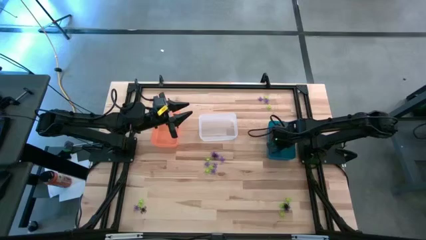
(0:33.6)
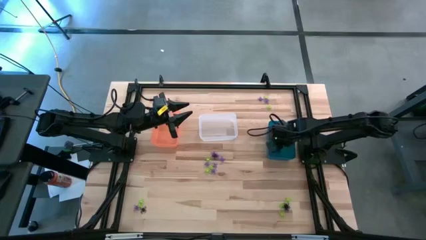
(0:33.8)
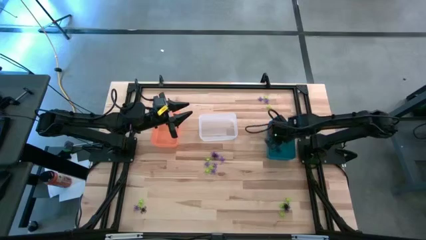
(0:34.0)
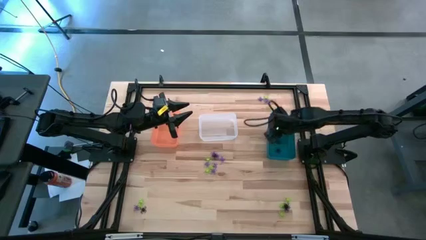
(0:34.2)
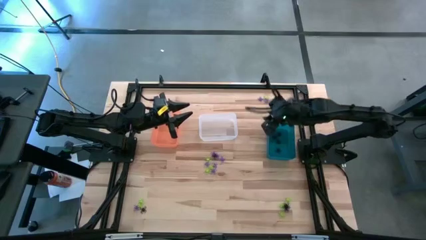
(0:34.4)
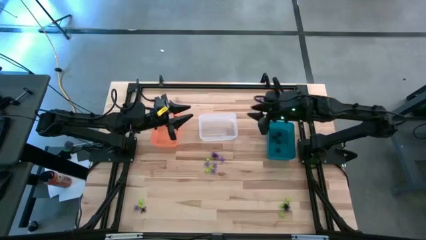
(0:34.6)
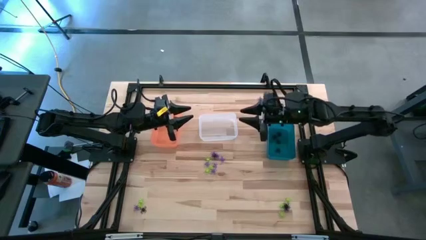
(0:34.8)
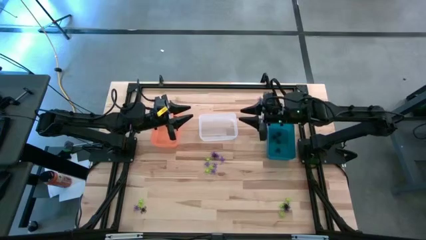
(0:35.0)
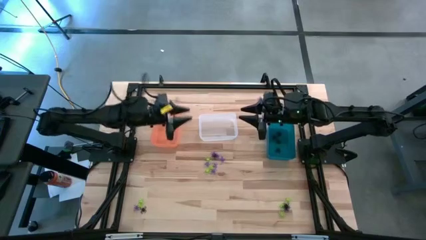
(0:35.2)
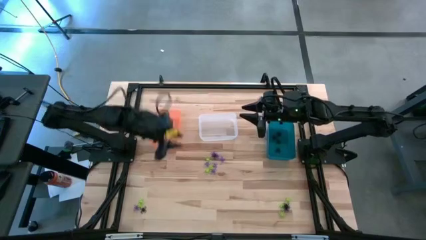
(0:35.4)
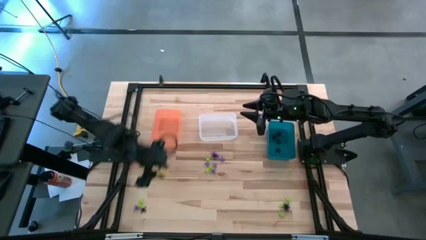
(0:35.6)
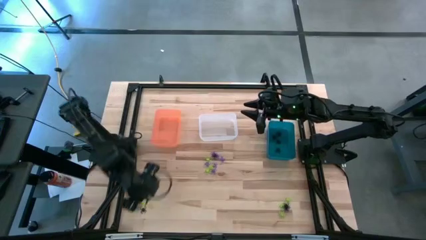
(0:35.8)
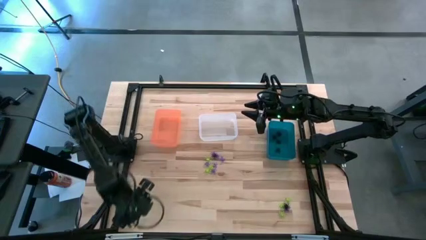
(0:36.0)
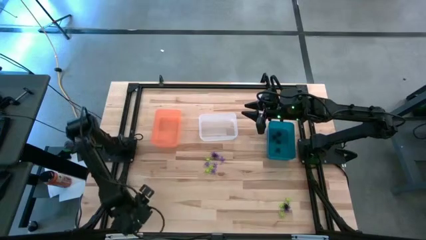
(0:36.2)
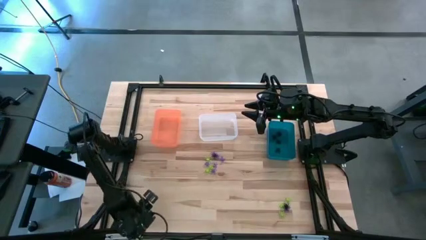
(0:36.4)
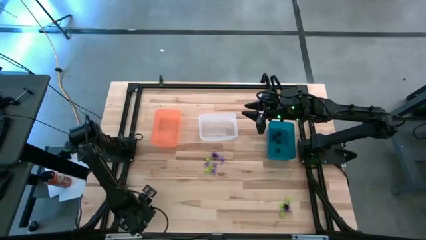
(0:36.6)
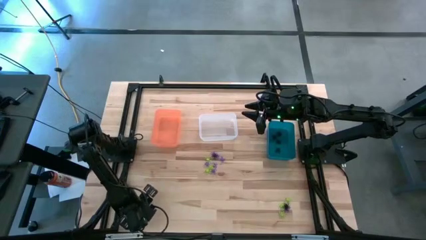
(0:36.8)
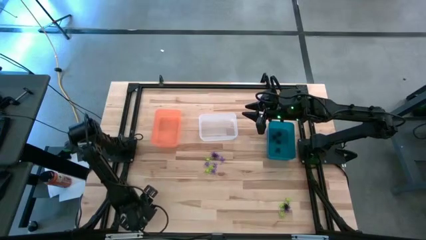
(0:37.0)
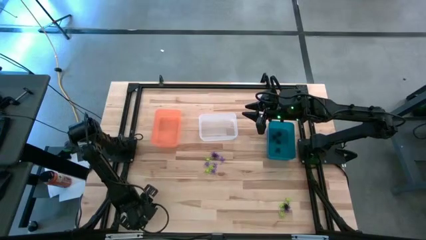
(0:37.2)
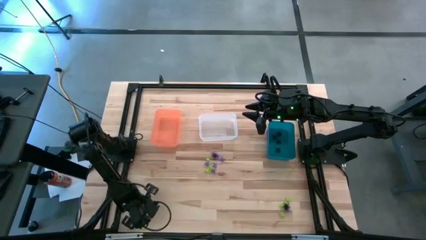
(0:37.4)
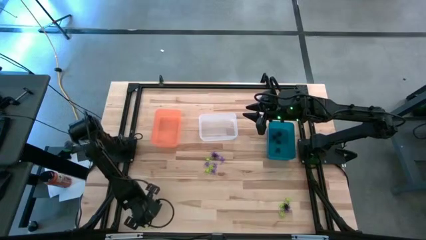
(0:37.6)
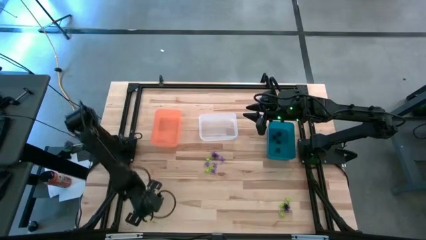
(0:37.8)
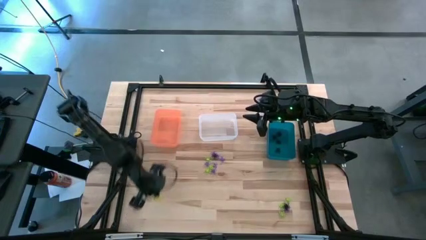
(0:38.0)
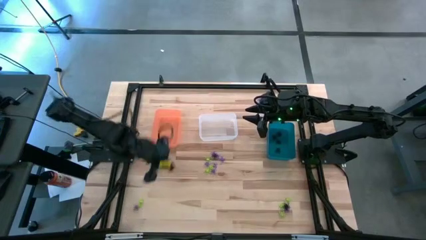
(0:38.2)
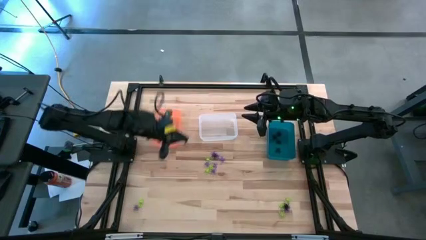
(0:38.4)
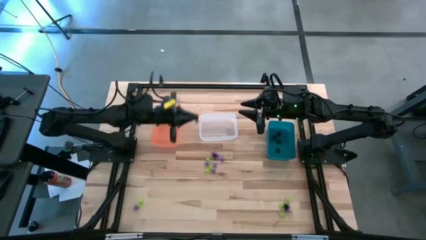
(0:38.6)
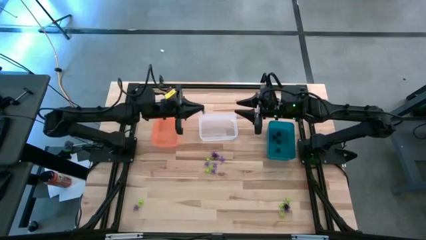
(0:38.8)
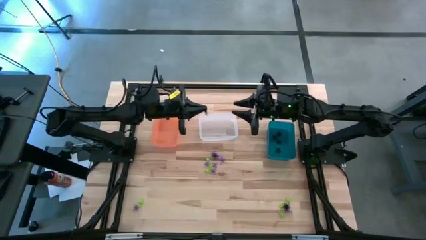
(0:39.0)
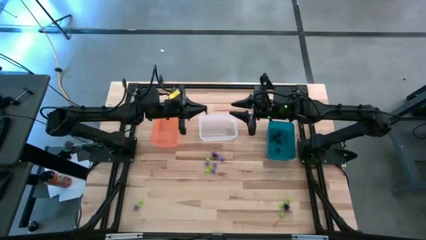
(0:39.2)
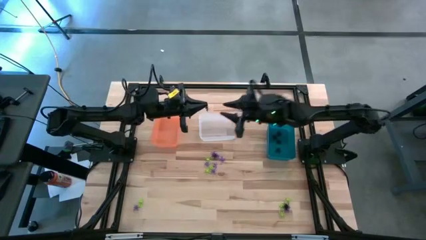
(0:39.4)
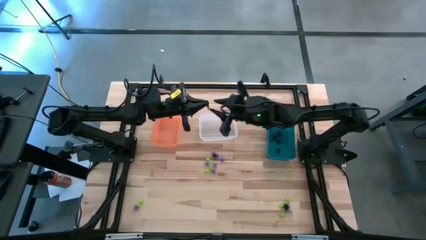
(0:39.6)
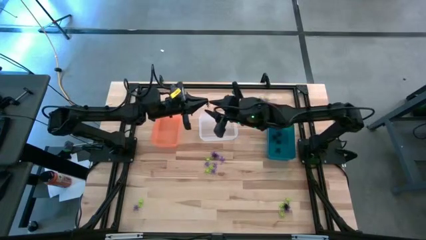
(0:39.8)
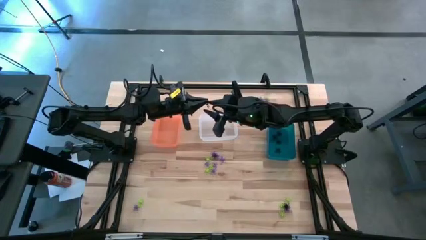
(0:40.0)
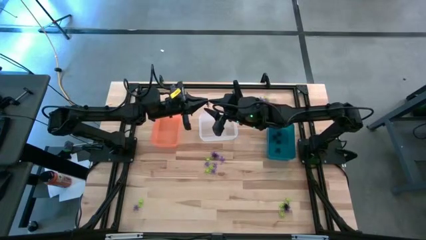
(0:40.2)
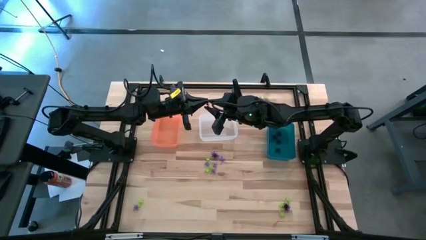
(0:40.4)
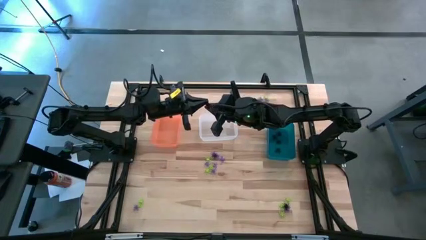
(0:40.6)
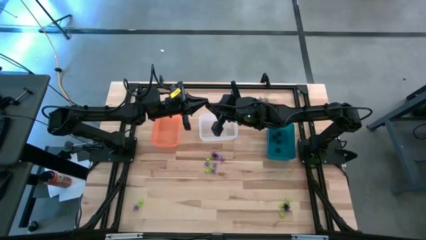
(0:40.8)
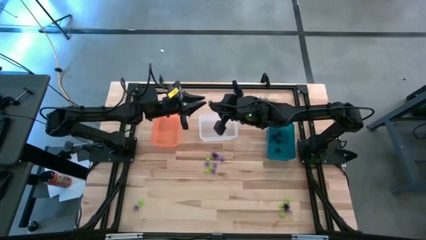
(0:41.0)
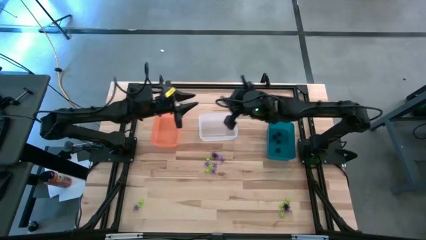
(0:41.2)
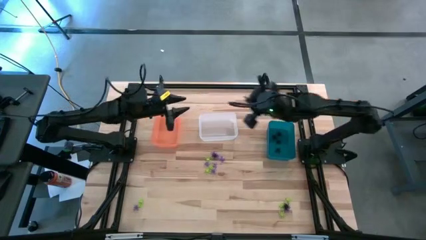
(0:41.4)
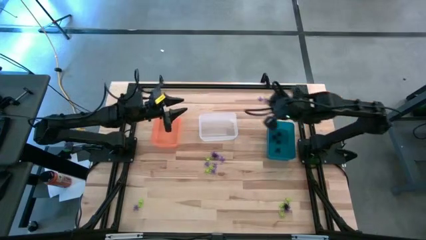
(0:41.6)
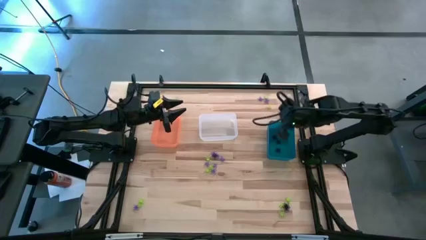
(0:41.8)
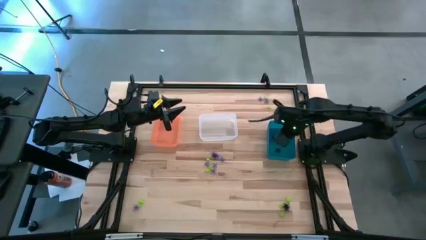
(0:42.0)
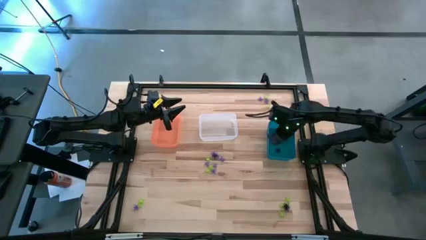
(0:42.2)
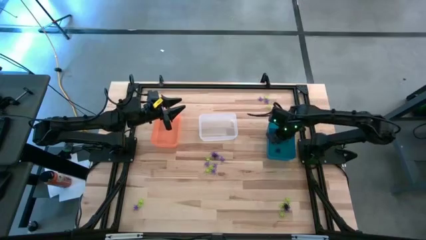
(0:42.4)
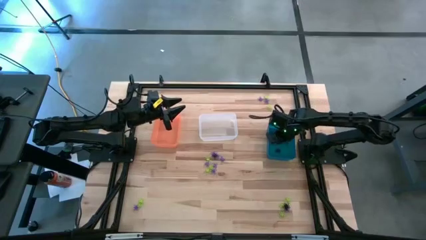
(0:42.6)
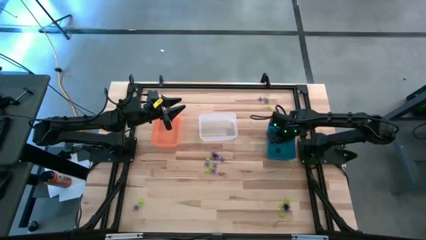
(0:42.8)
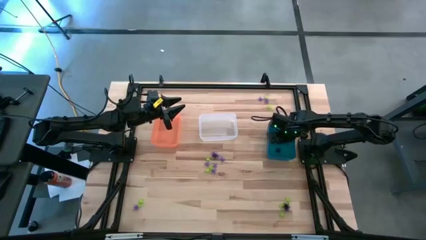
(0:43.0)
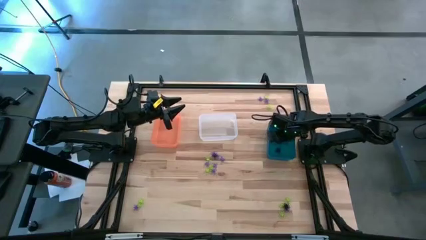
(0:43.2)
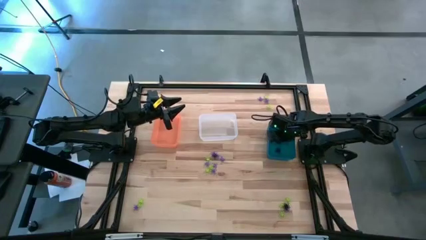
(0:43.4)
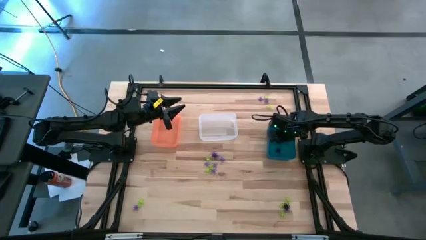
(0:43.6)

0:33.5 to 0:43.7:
Task: Sort Halloween decoration
Put the black spider toy into the blue bin

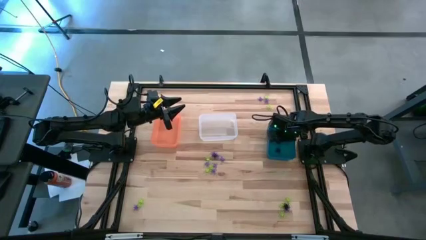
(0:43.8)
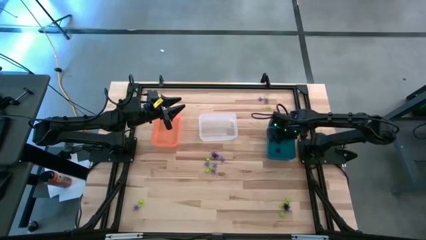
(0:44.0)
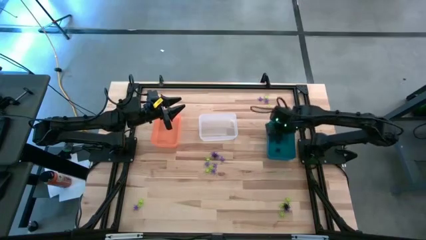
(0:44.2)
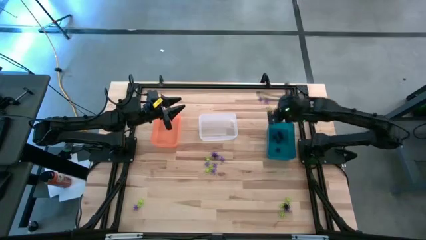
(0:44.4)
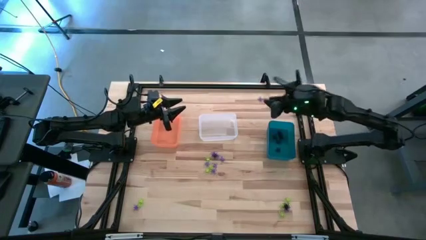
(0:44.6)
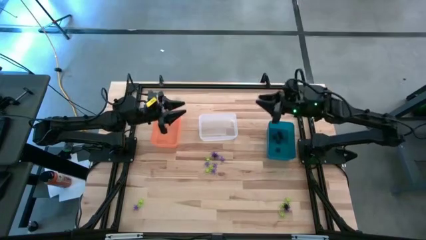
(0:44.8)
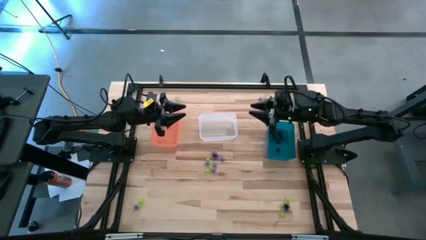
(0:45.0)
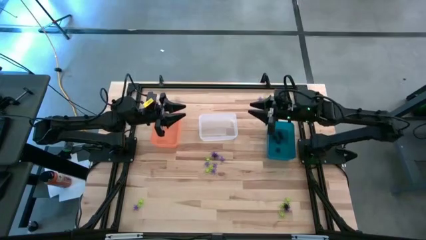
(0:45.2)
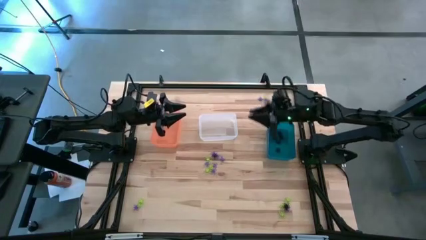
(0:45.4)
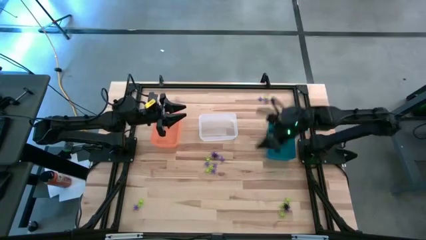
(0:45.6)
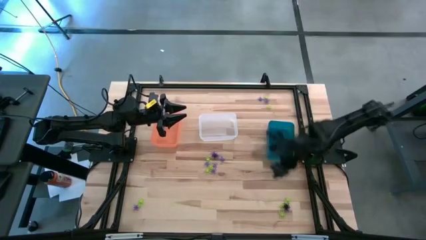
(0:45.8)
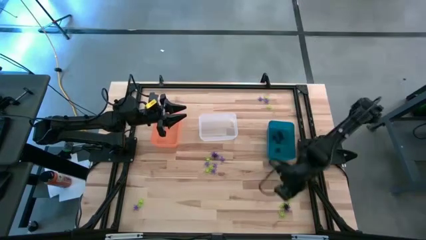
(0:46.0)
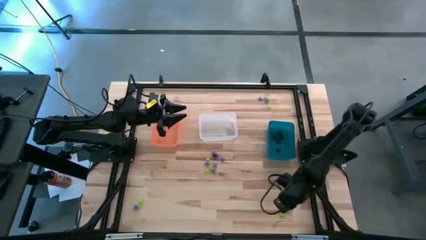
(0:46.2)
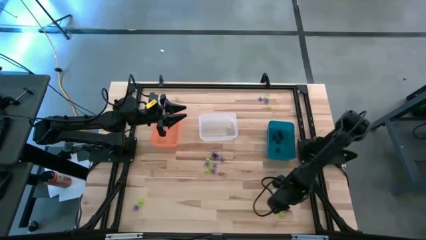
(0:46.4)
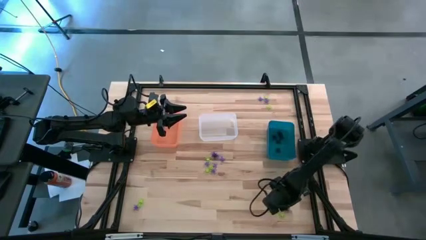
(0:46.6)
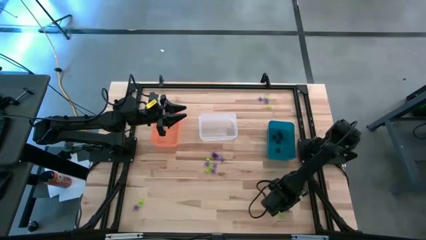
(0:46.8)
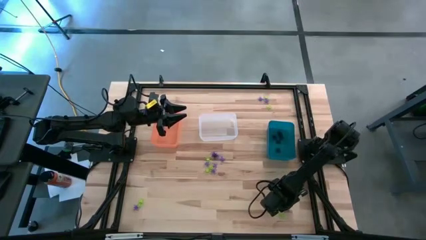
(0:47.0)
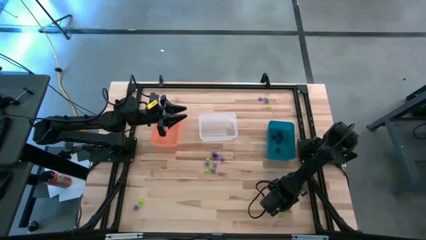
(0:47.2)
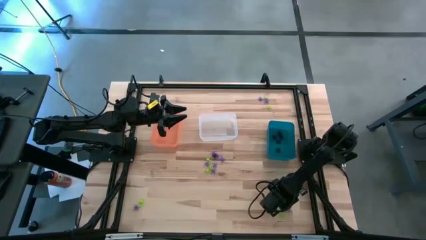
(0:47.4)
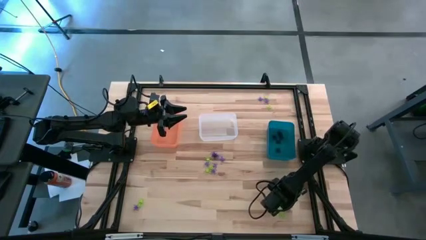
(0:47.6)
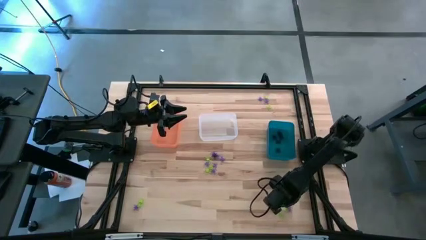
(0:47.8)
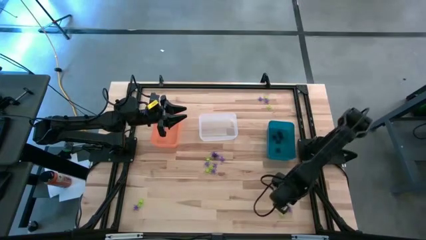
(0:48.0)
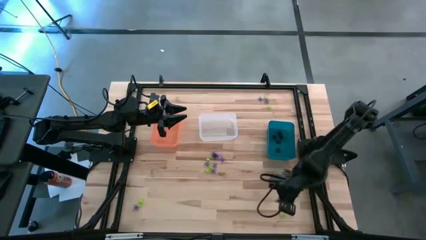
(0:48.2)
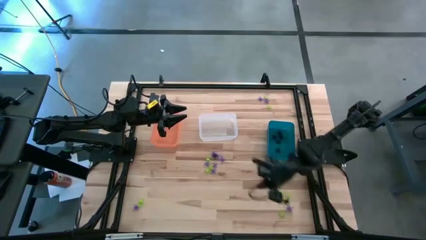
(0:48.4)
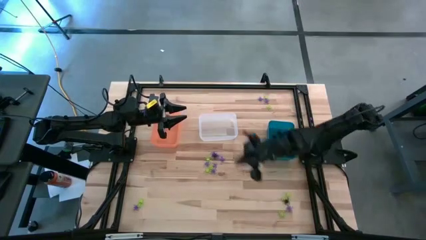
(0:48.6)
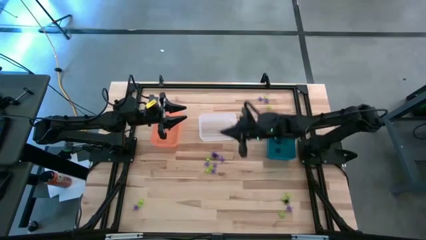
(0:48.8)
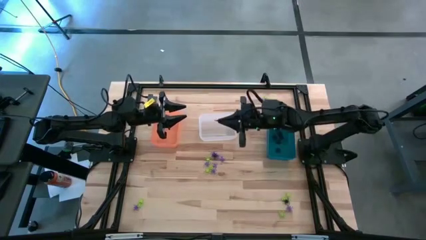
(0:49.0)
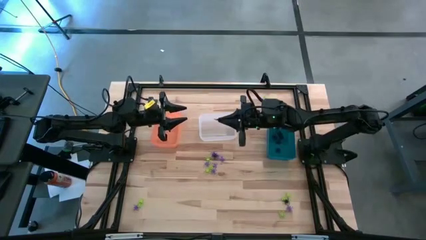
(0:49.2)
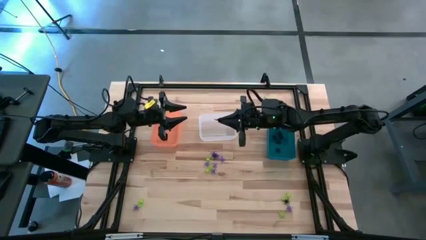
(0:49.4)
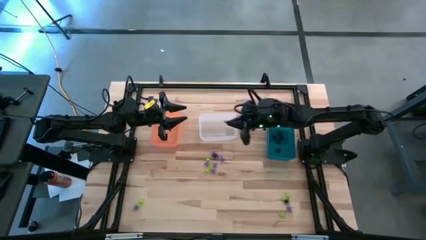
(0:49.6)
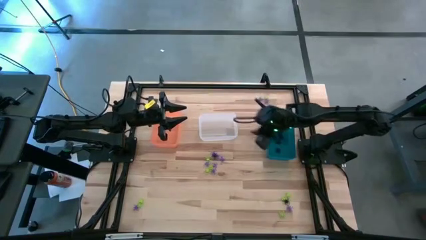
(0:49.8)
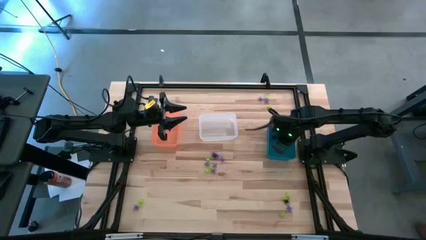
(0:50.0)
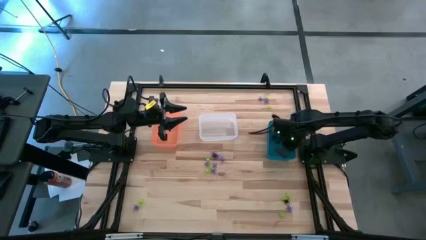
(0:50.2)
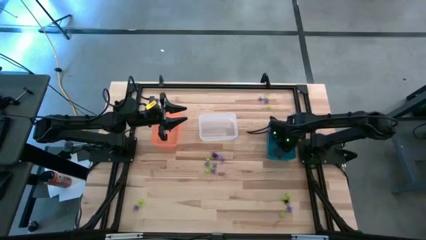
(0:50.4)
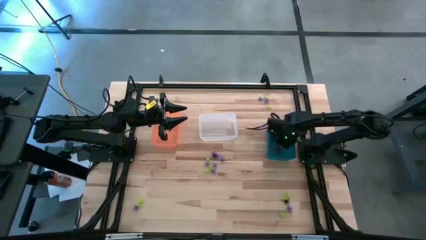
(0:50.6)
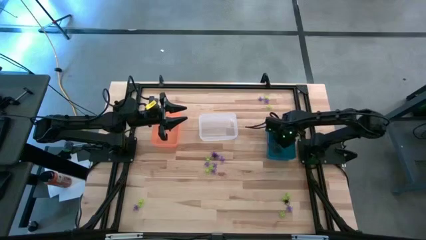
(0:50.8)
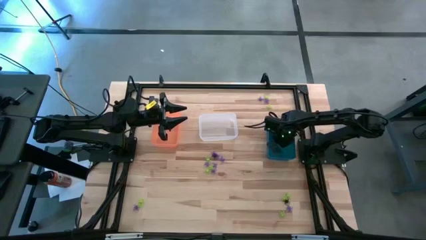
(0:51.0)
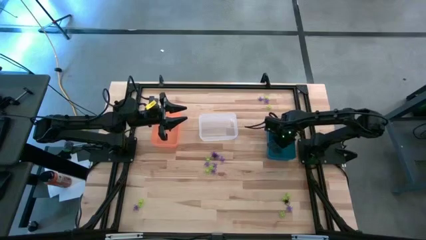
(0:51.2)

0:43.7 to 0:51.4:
Put the black spider toy into the blue bin
